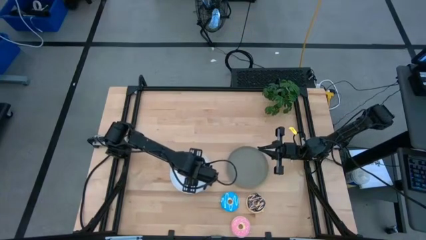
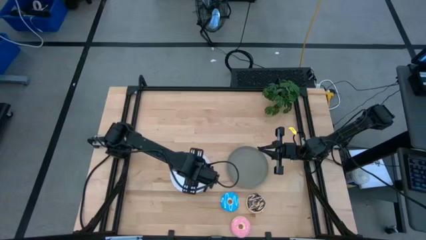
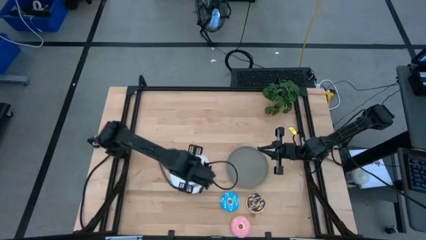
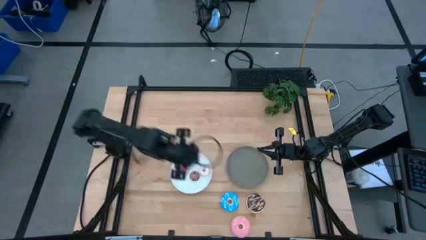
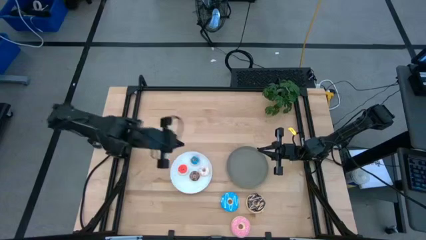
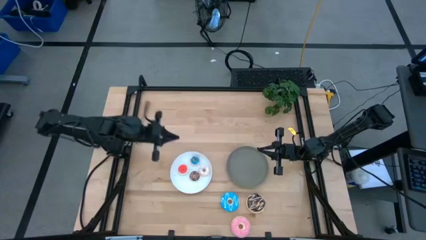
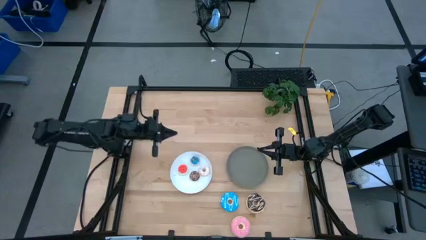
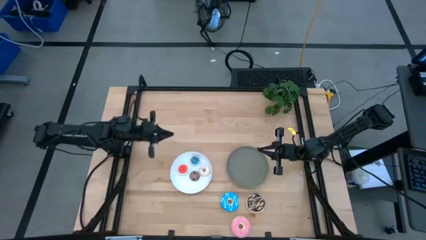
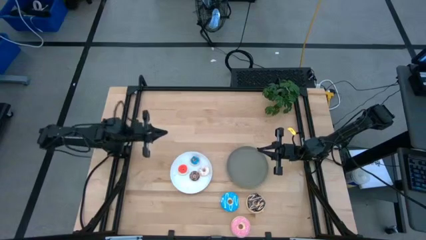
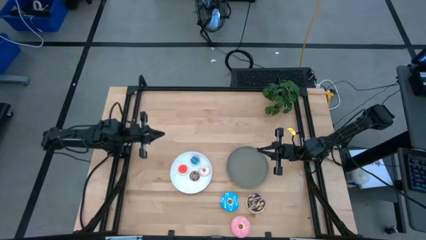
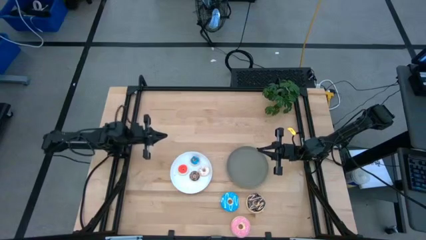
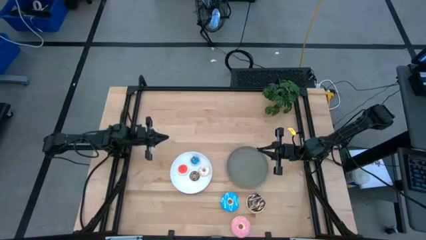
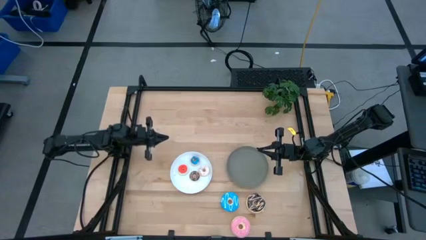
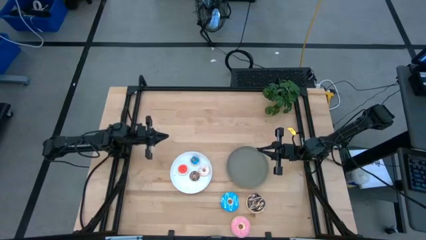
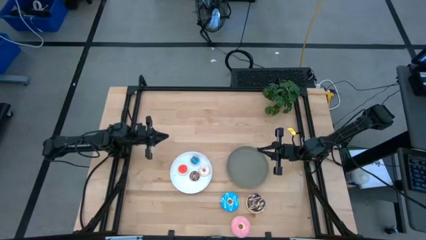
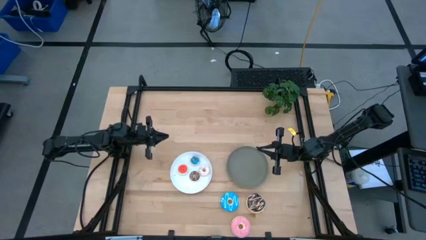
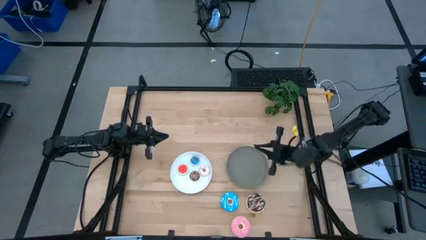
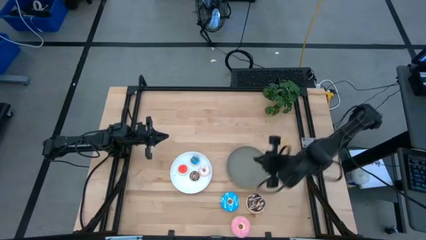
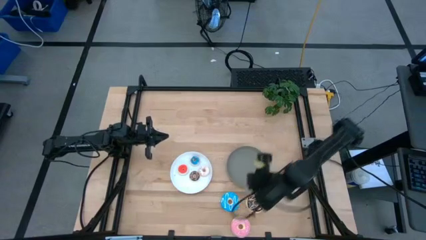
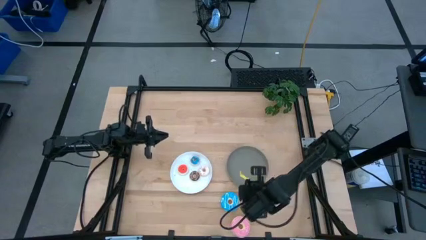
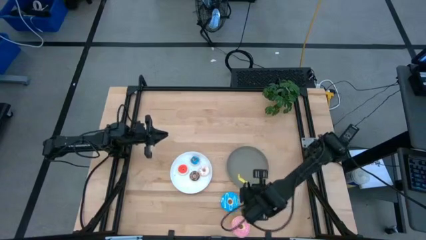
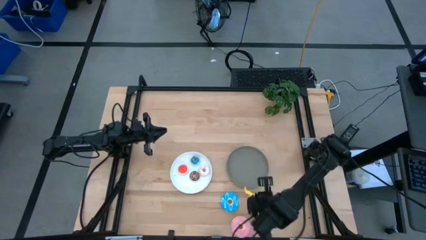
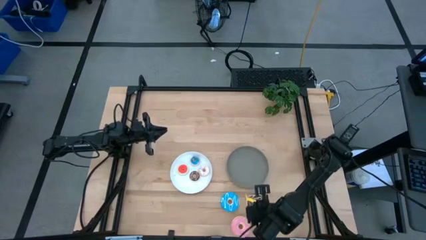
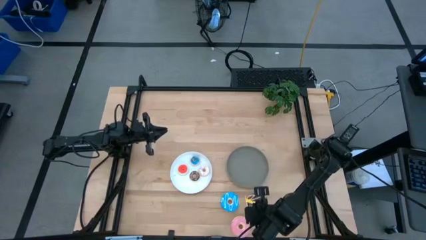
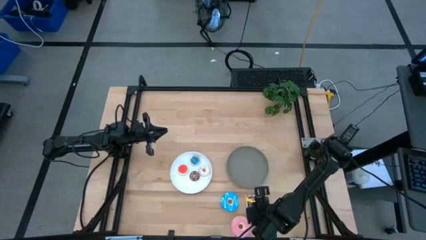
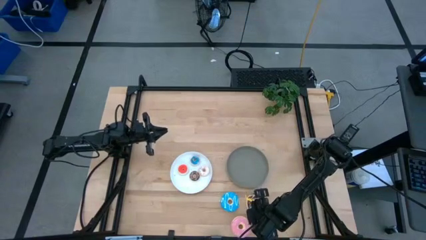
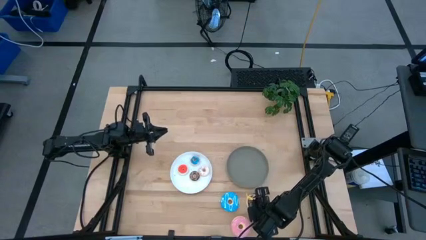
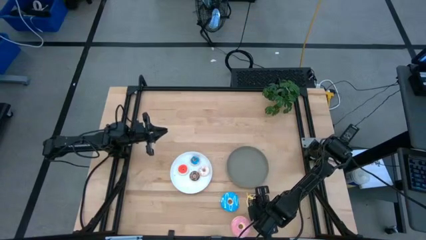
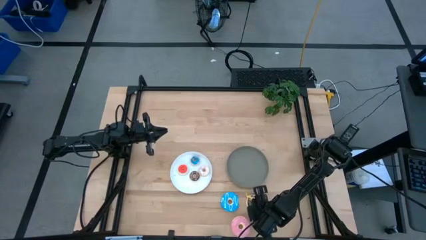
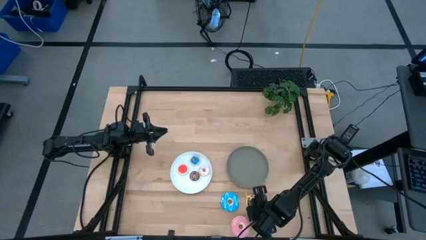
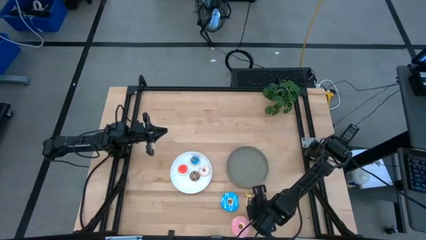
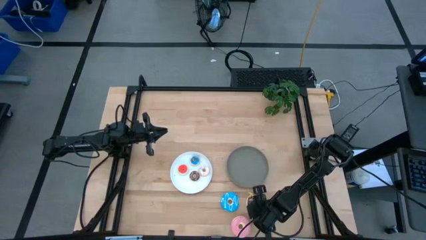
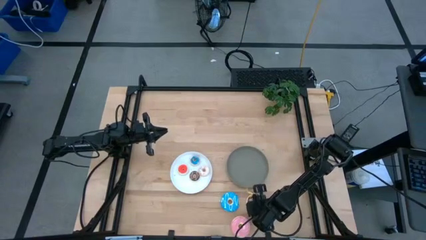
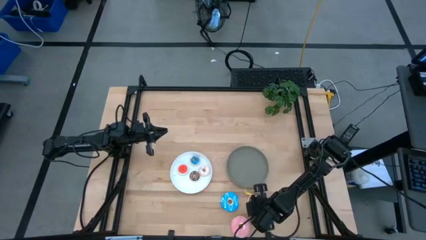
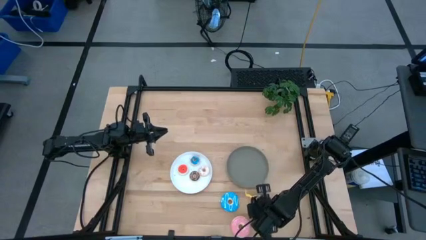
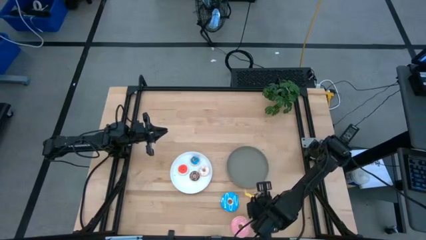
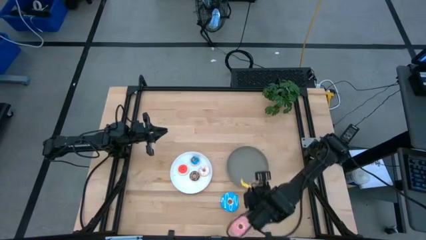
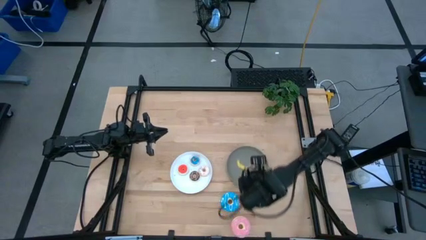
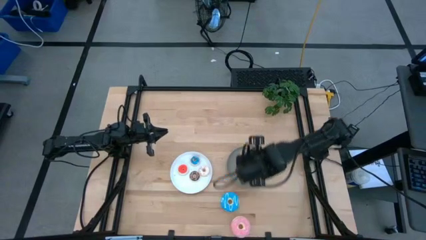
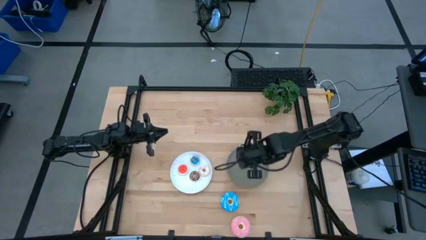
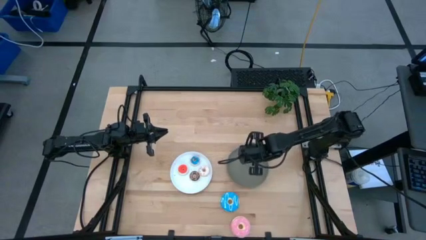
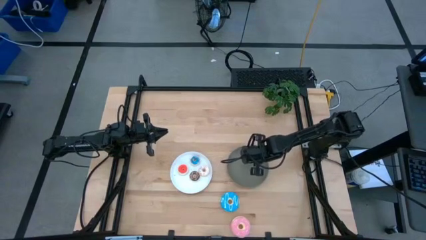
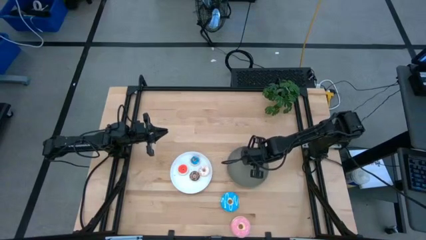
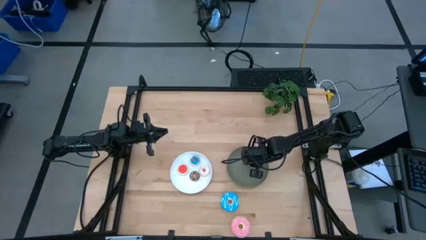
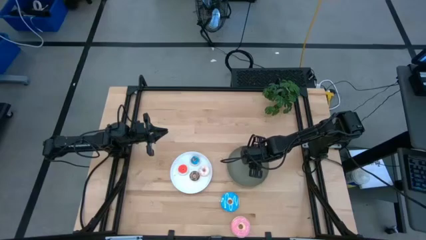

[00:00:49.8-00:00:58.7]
Task: Pick & Place donuts
Put the black doughnut on the gray plate

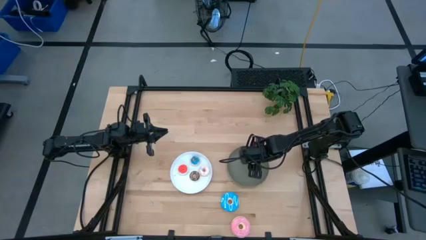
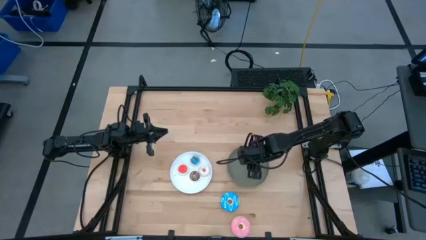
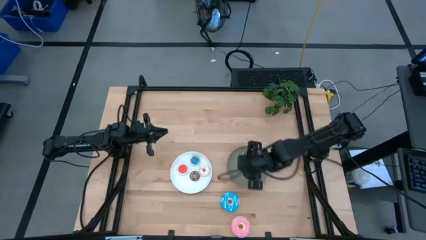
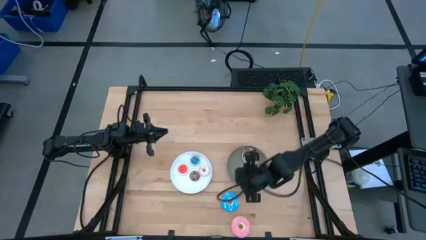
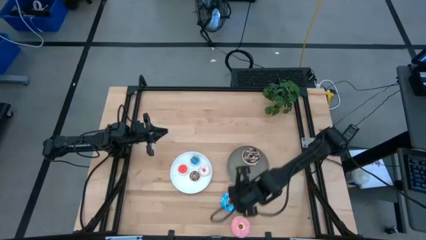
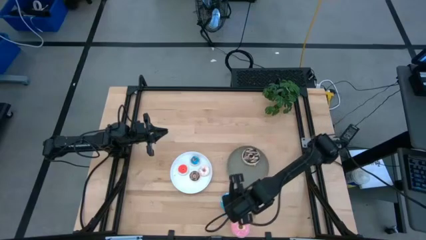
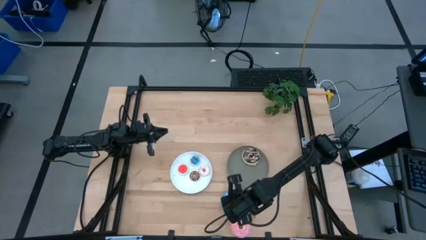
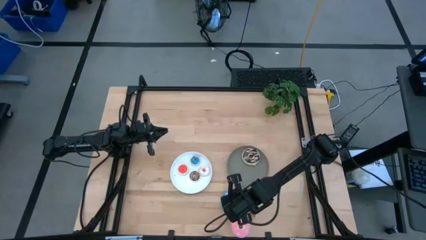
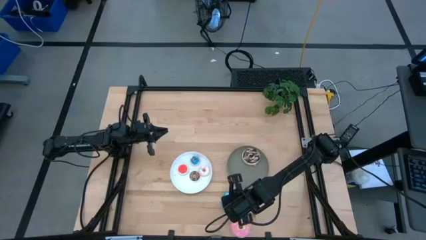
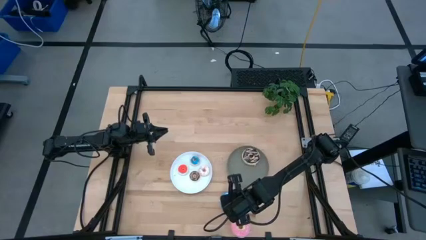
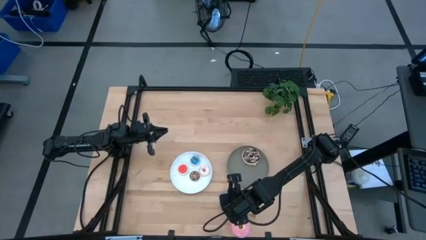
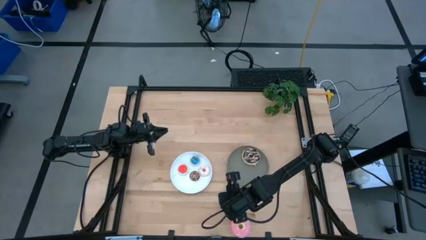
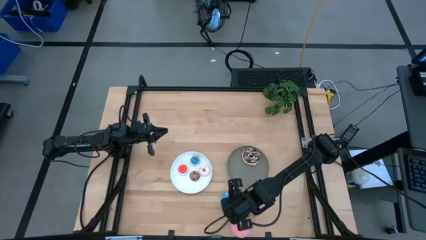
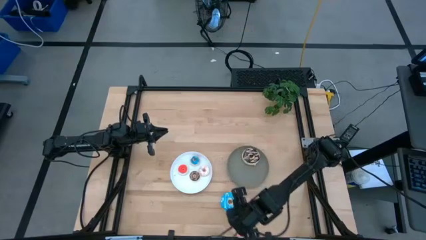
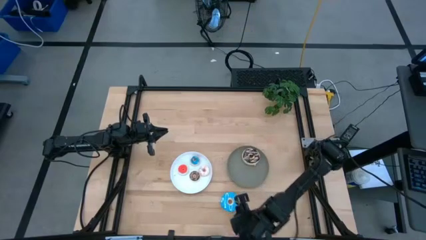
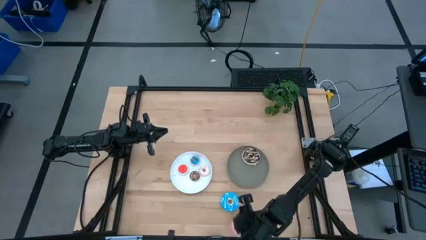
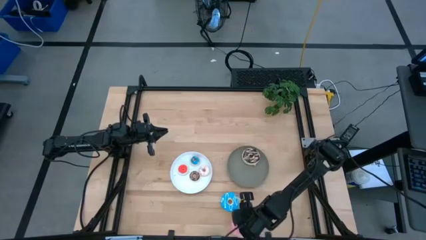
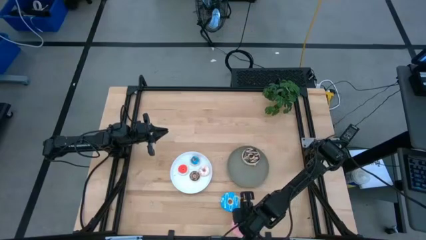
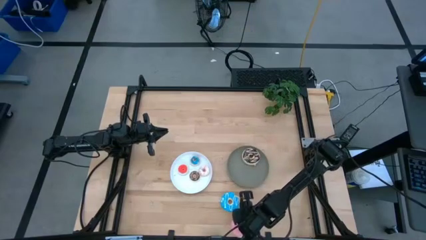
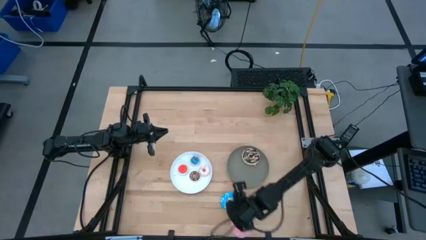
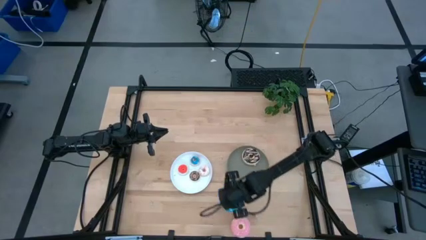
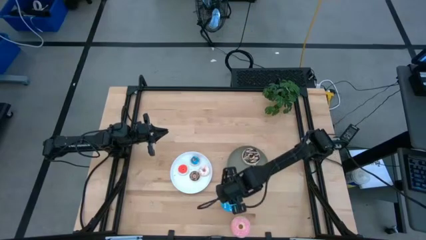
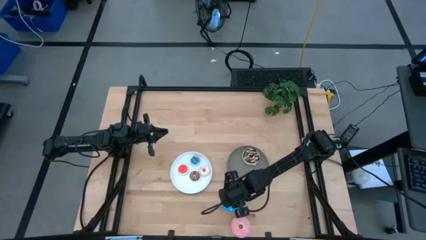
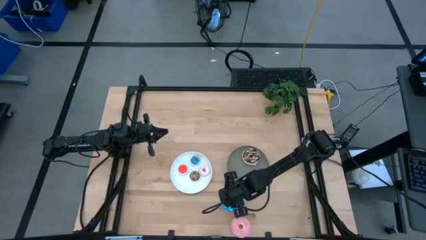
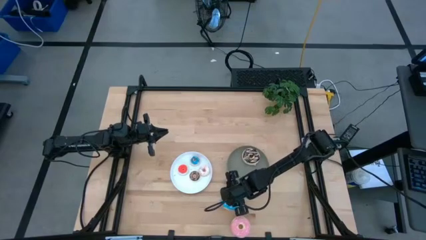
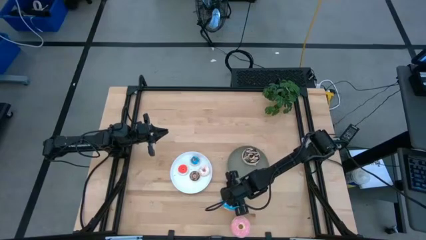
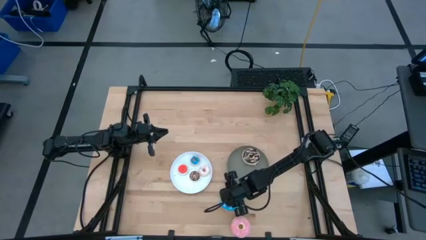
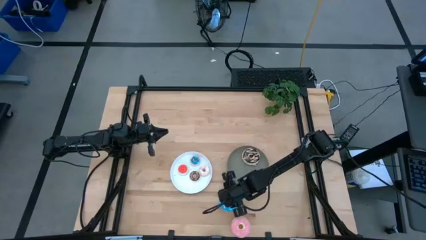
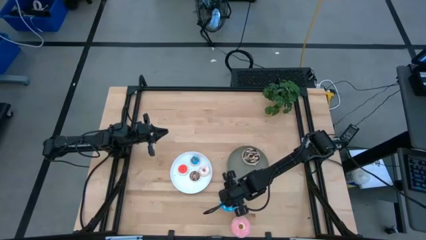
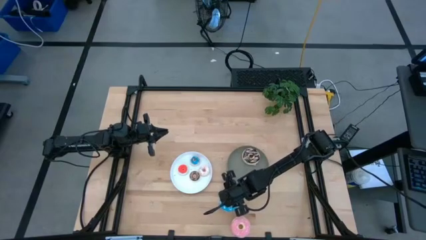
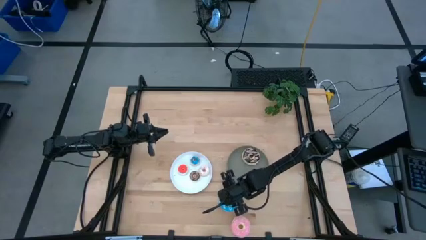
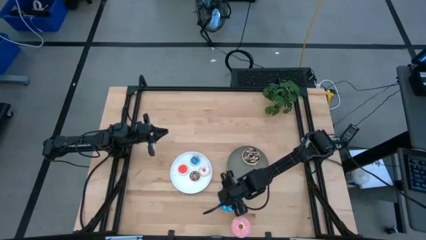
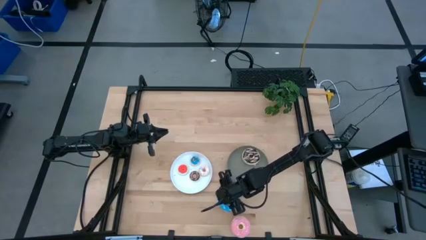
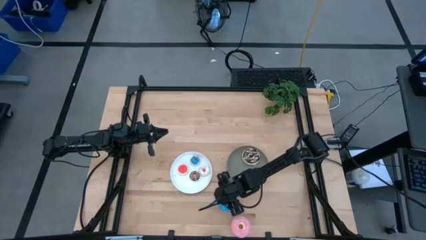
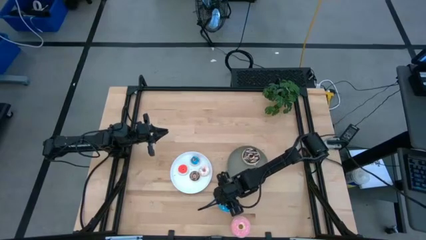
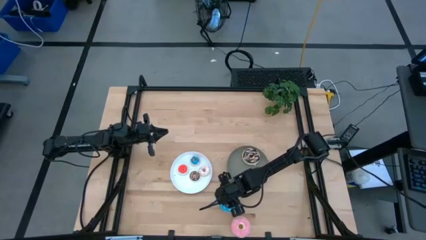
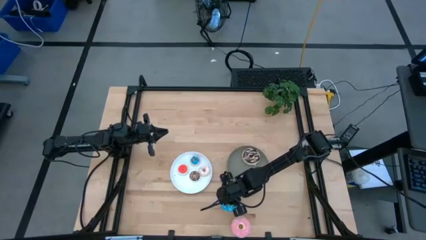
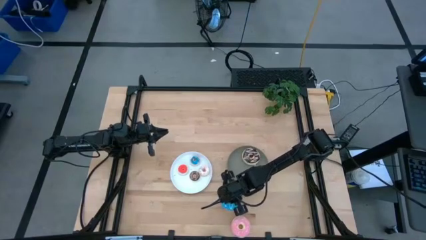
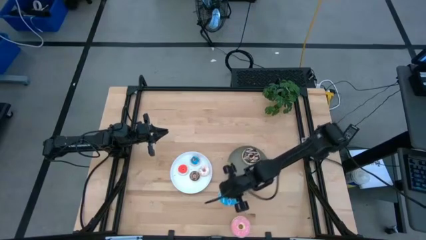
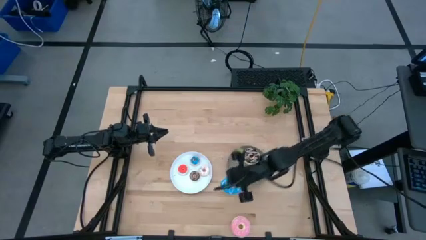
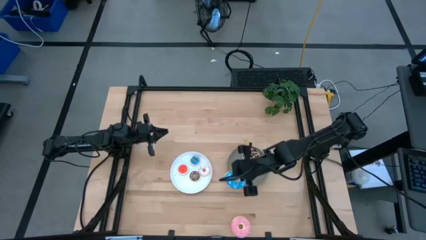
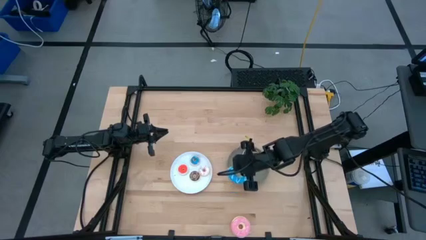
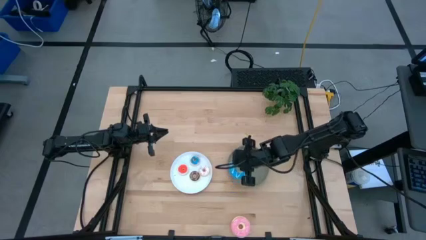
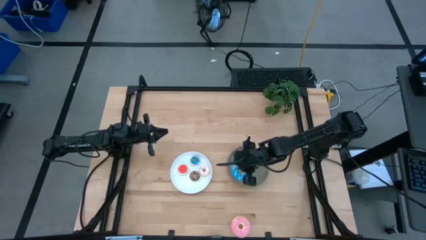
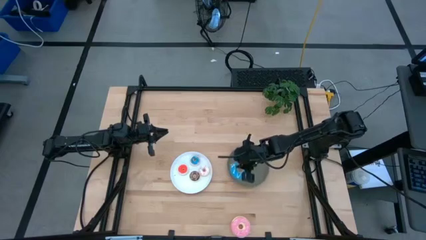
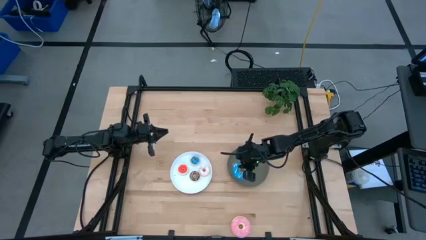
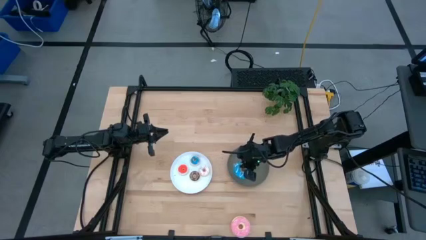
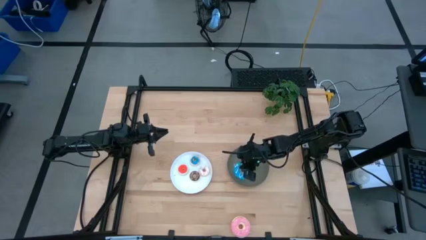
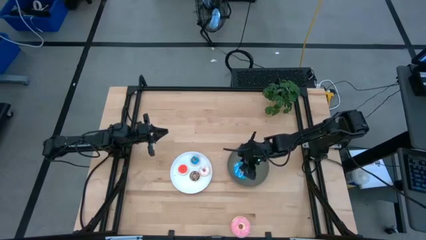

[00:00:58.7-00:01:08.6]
Put the blue doughnut on the gray plate
